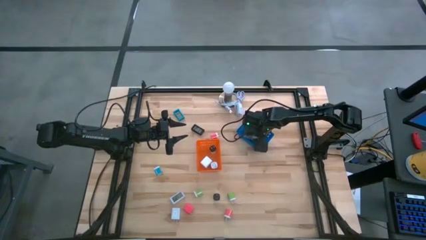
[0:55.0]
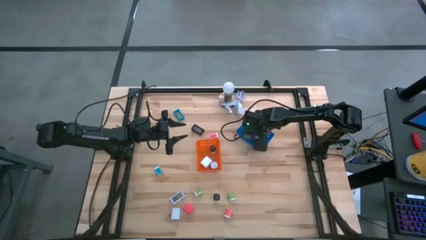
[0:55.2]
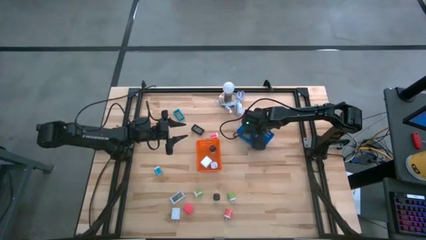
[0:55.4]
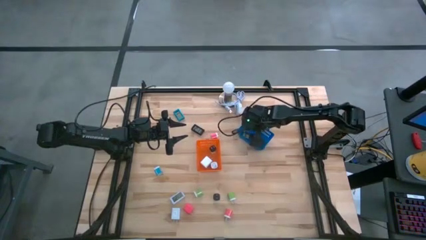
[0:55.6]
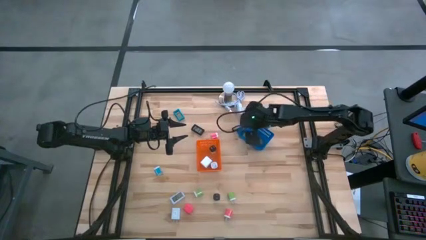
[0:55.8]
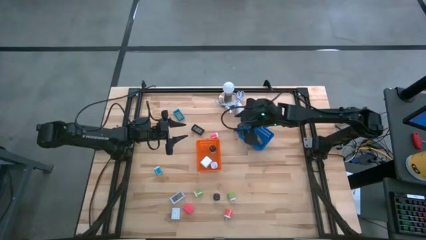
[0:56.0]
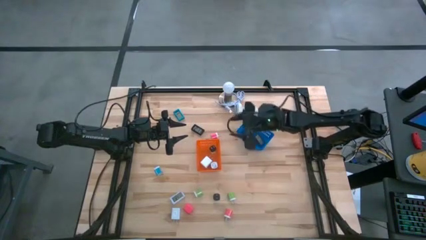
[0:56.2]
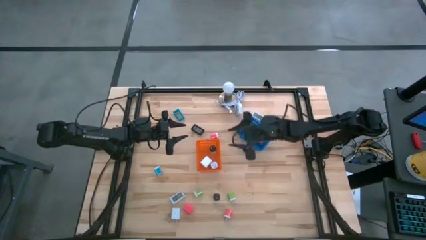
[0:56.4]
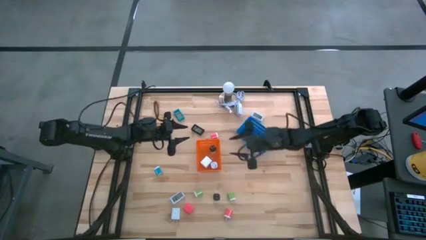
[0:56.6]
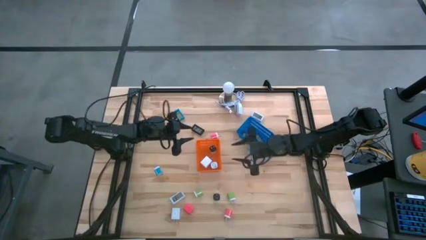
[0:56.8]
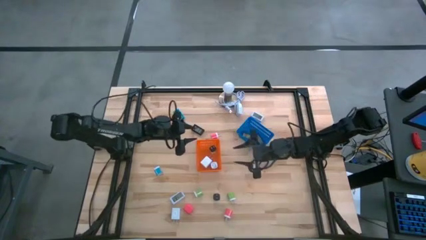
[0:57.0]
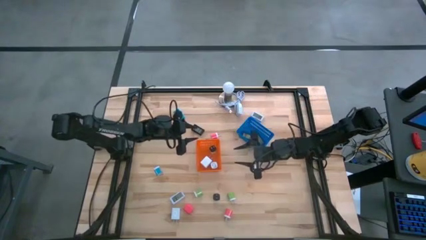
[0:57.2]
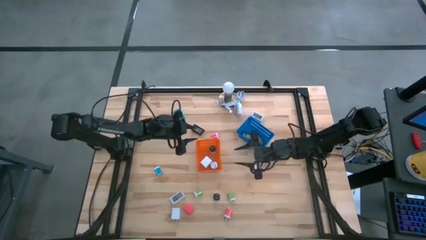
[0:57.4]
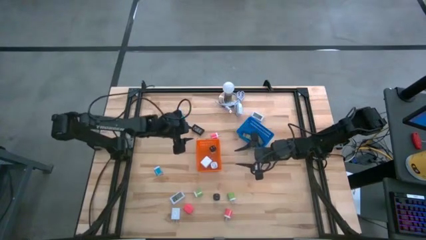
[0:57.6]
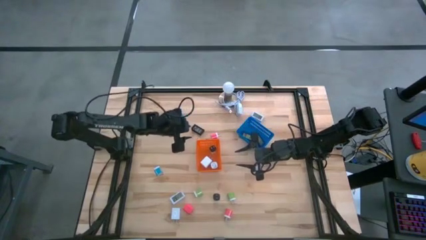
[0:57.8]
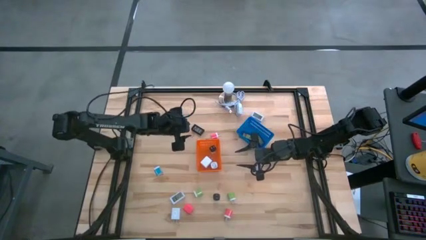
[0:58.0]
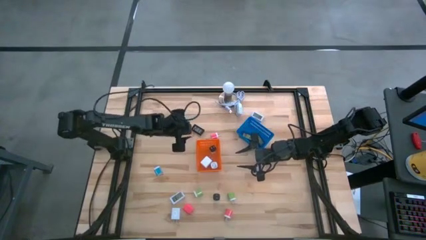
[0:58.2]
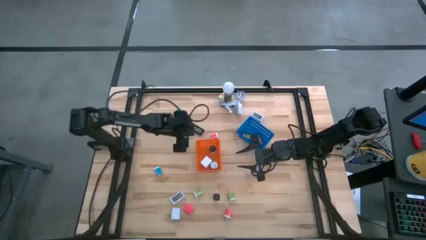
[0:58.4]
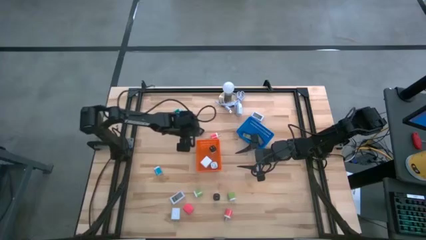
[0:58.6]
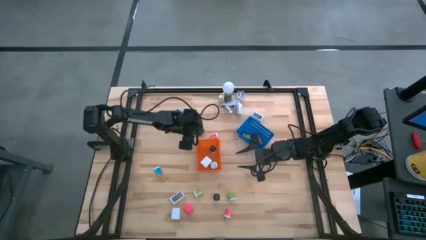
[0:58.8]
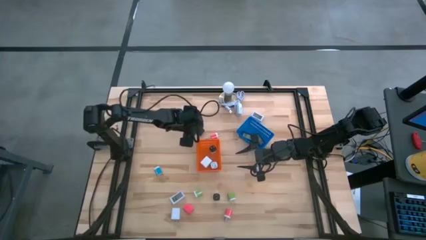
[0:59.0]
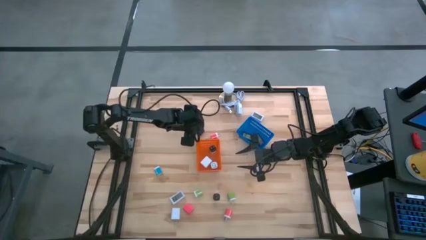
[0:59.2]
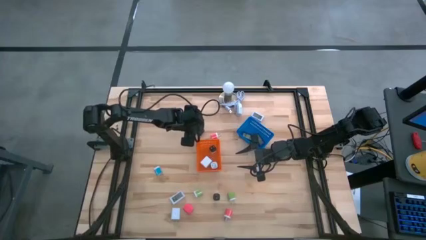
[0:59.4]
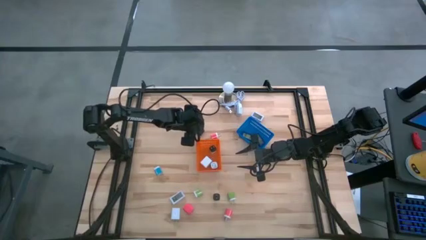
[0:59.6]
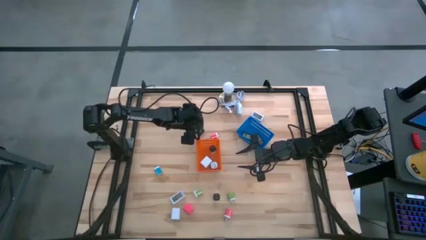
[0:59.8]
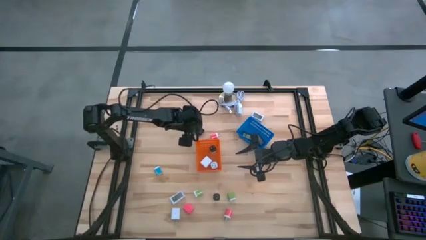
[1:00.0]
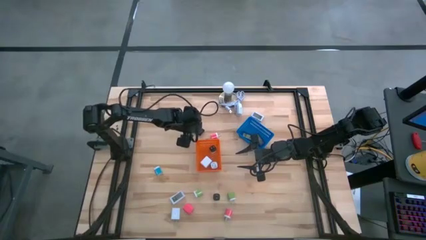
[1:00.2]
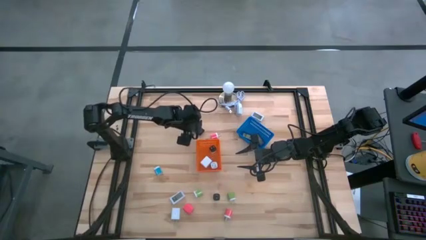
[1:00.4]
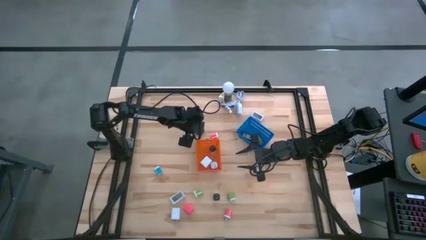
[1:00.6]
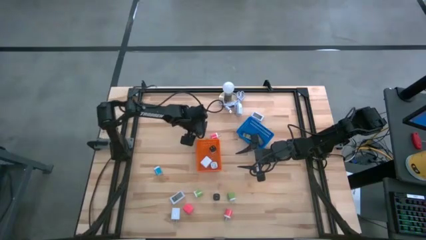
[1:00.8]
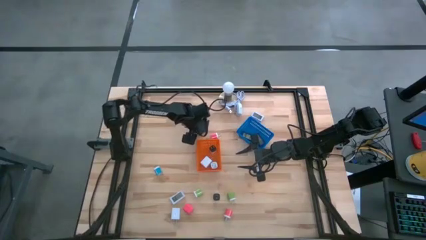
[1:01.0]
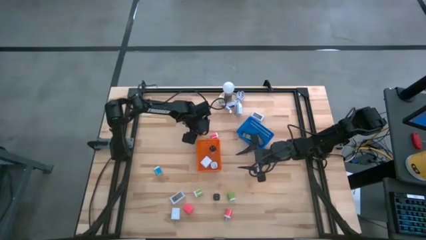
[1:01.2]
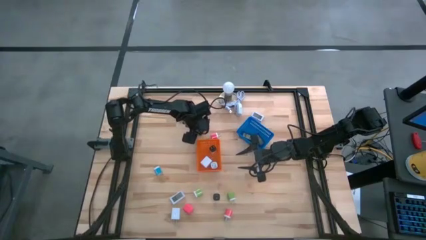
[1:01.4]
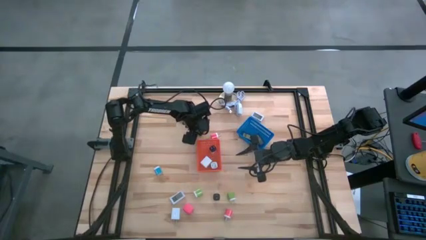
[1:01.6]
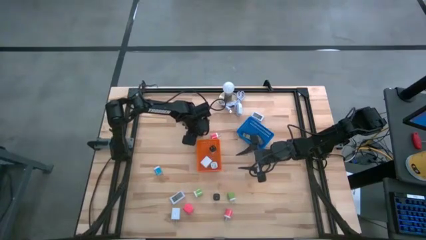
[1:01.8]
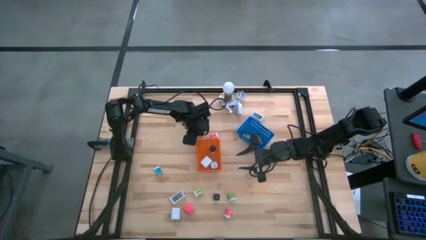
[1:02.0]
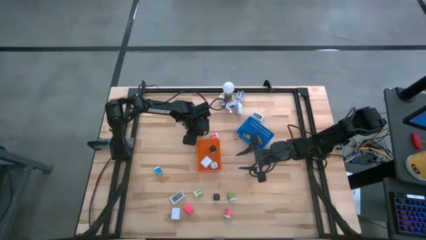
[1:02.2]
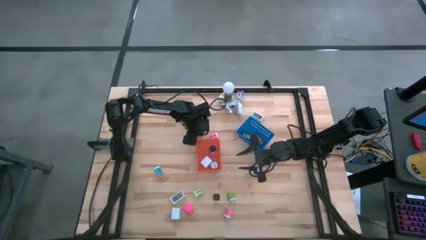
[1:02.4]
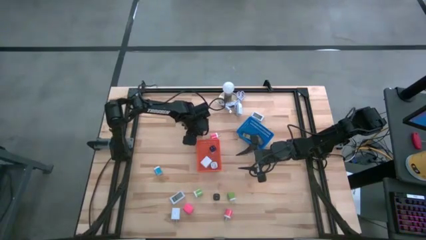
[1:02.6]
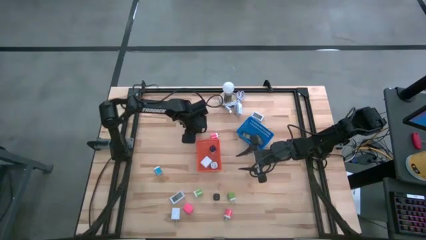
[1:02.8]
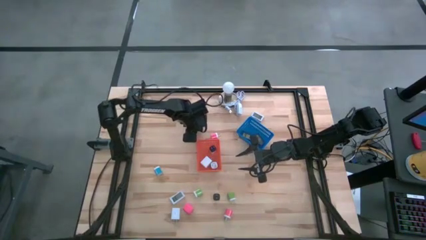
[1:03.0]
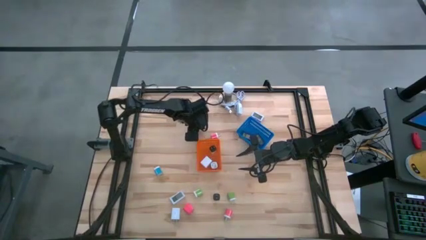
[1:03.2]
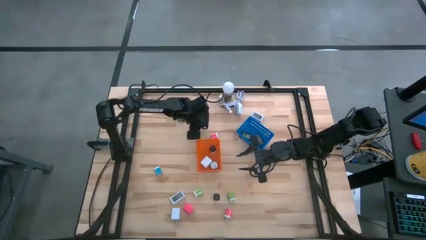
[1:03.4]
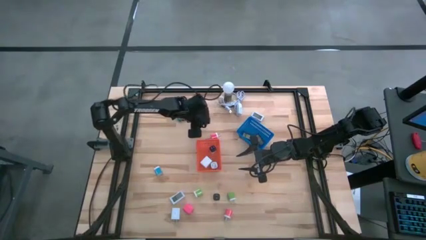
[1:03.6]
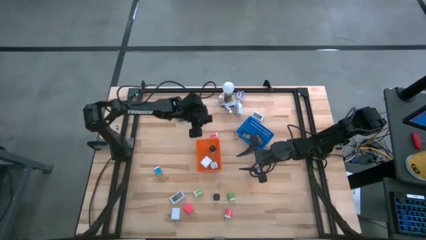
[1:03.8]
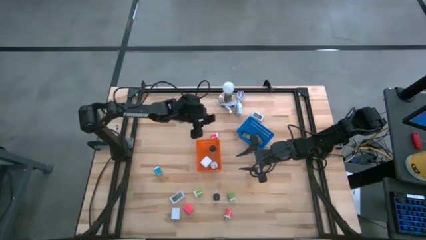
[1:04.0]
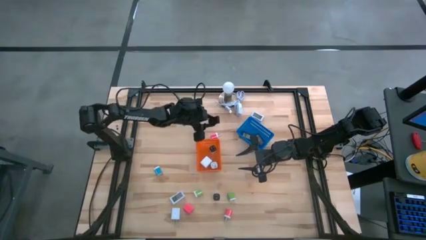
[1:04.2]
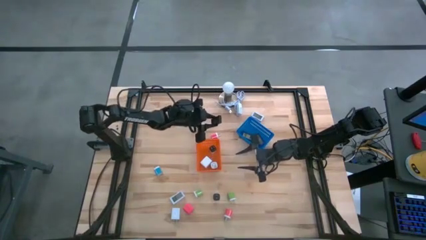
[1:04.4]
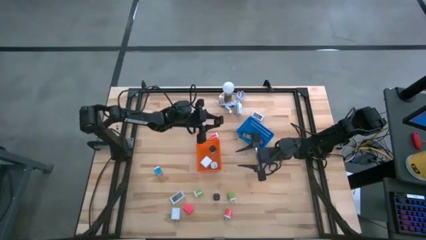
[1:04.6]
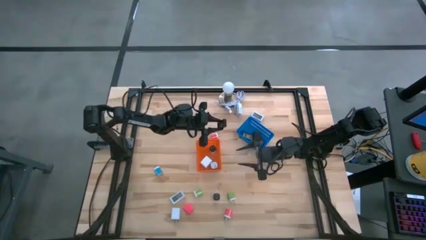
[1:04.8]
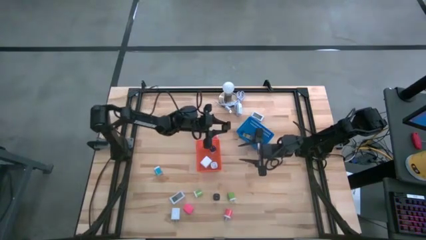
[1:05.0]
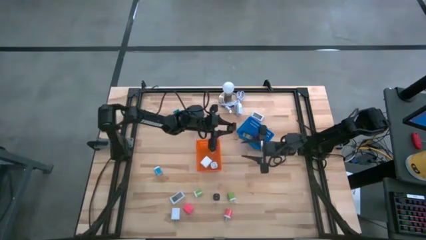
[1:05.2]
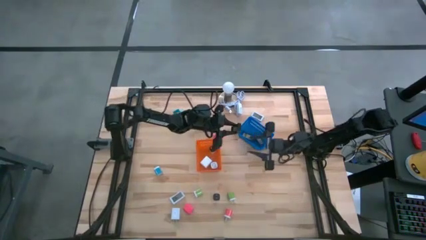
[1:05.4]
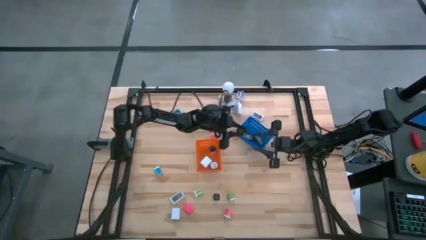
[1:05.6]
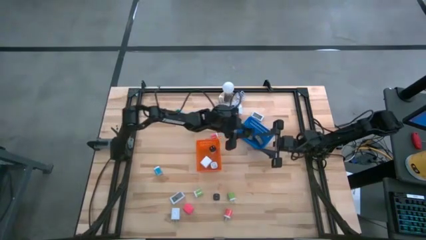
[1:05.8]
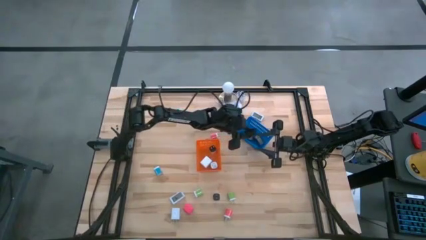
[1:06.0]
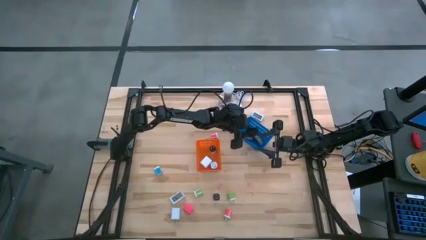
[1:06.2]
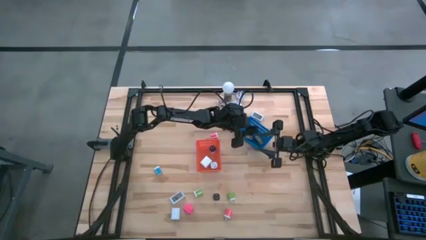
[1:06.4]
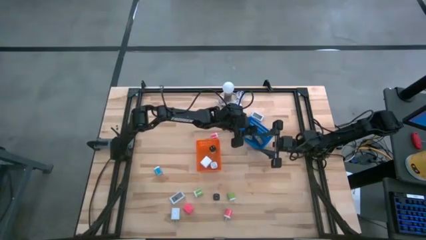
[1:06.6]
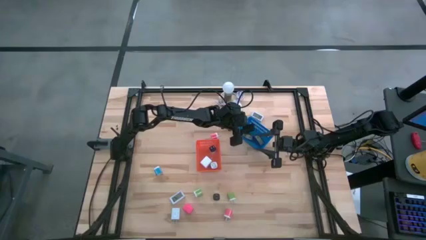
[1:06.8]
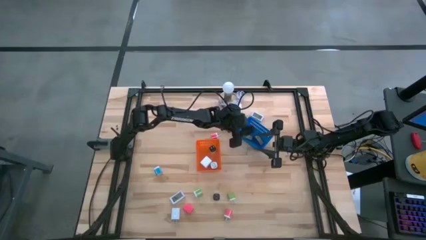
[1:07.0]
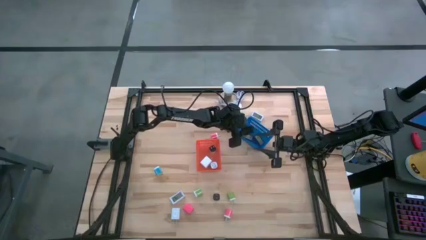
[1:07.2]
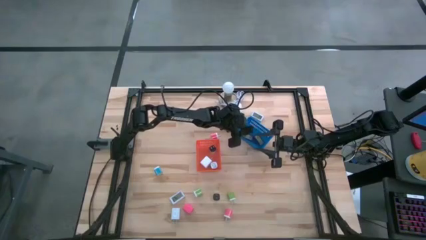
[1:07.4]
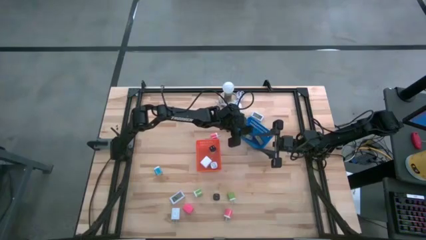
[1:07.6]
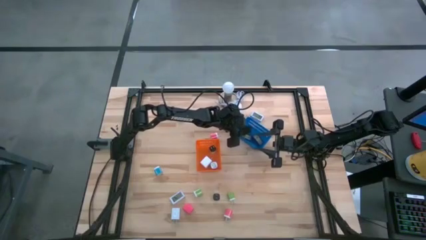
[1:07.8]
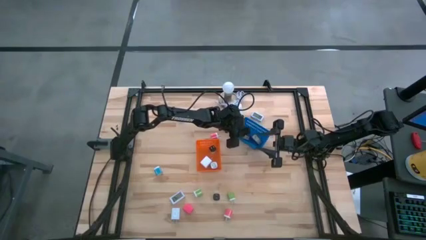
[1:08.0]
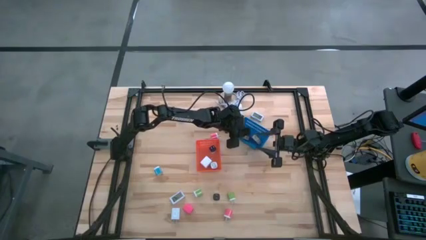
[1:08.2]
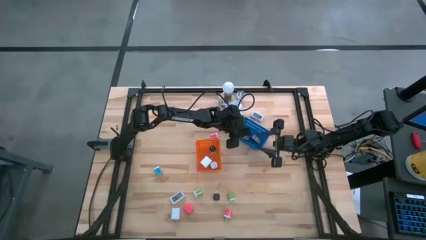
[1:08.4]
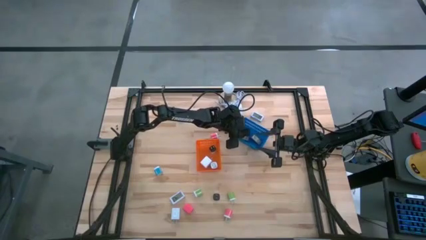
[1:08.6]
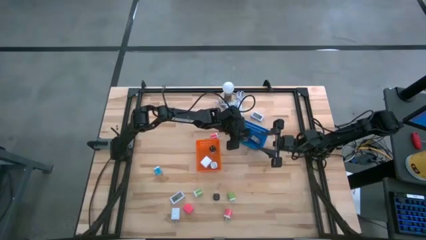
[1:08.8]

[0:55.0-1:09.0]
Task: Pick & Place Office items
Put the black digital timer into the blue bin

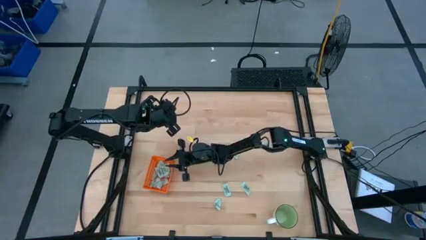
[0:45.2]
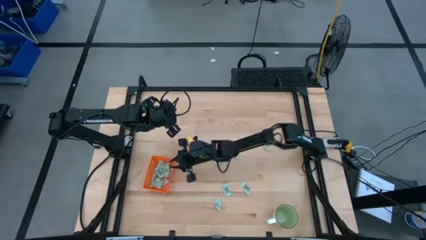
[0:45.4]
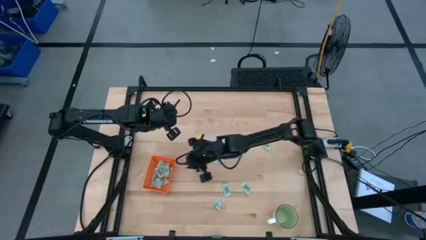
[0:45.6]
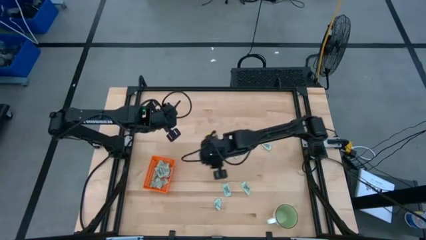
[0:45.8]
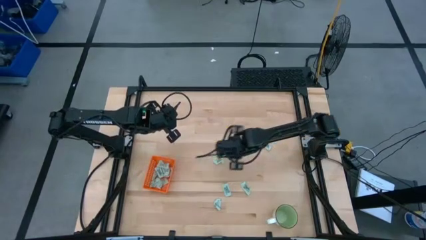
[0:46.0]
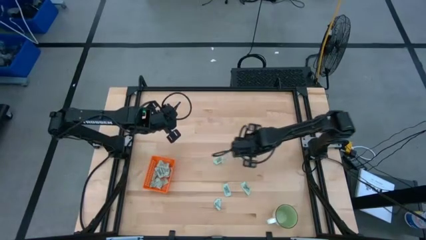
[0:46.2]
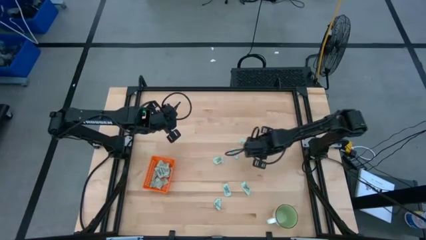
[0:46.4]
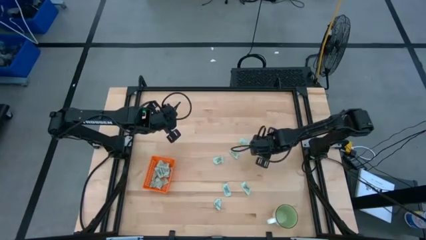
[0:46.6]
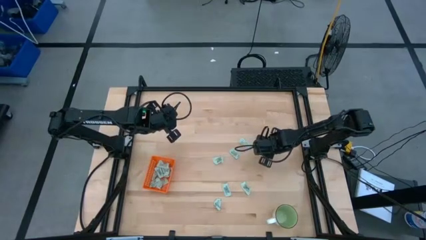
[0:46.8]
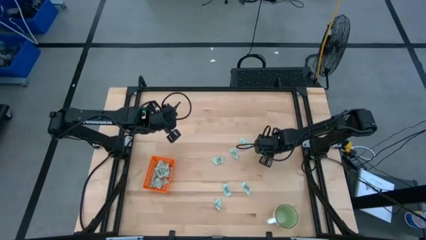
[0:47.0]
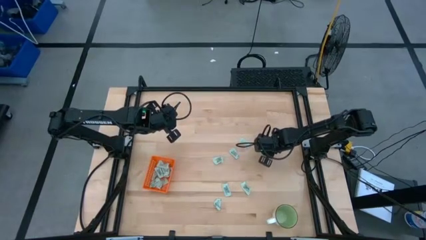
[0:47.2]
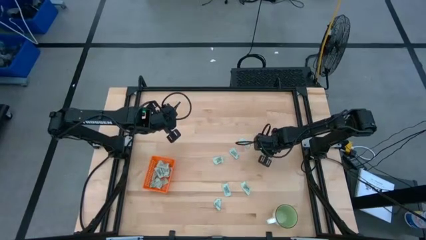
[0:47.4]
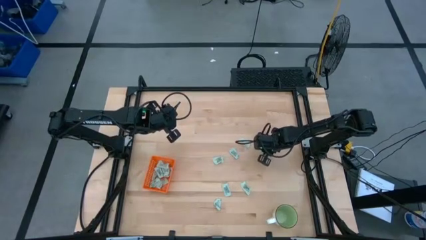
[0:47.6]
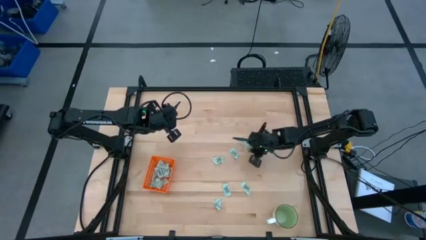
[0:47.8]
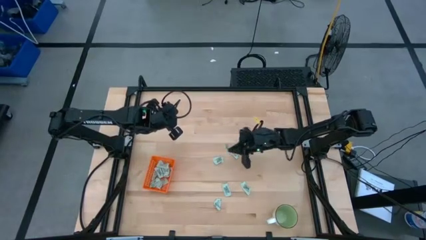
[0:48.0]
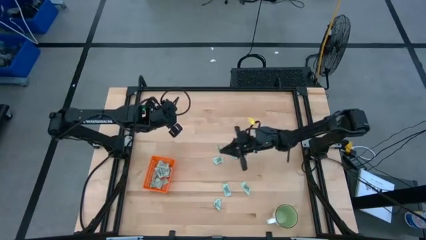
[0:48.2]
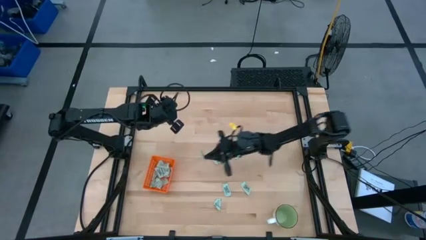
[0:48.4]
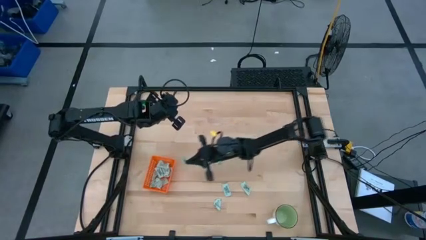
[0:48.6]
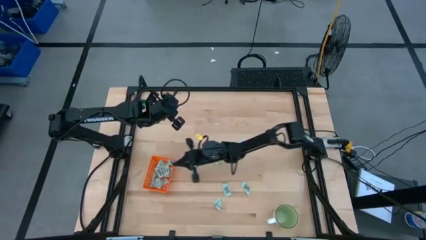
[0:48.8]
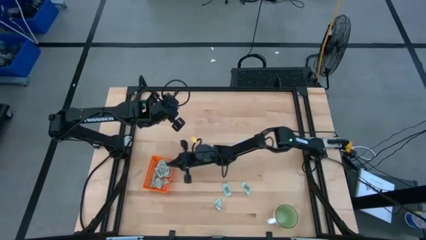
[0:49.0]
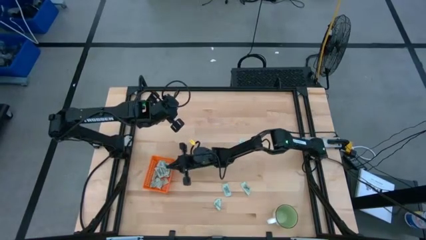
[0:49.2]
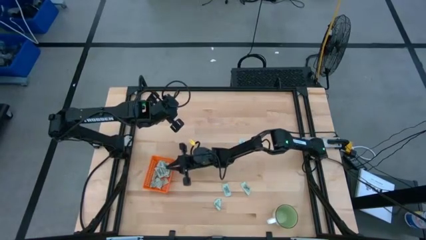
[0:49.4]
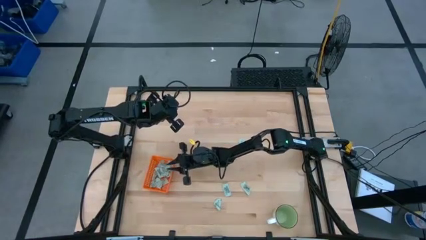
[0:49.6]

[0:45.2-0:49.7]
Task: Pick and place Stevia / Truvia into bins
Put the white stevia packet into the orange bin
